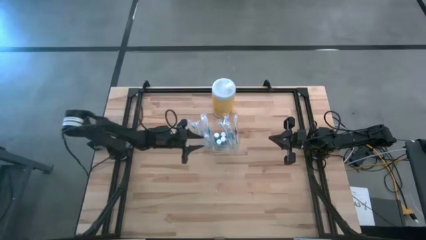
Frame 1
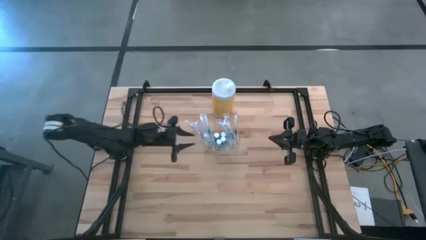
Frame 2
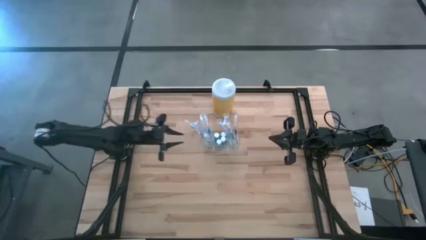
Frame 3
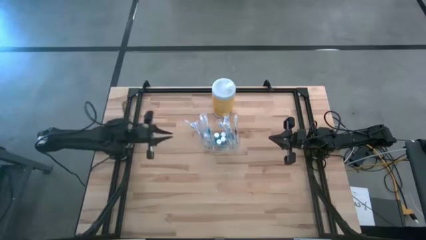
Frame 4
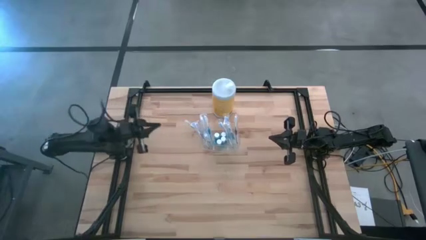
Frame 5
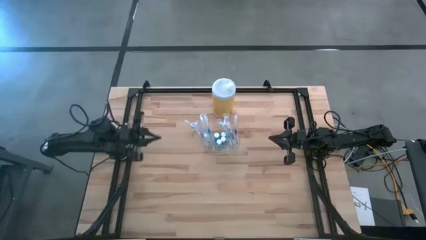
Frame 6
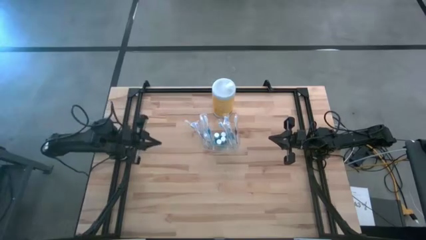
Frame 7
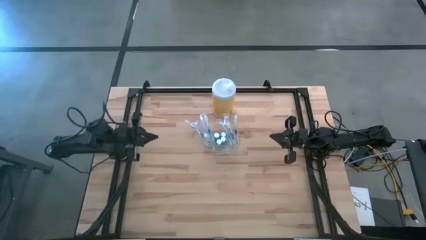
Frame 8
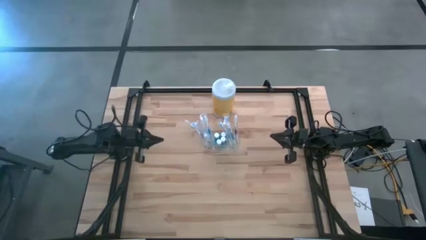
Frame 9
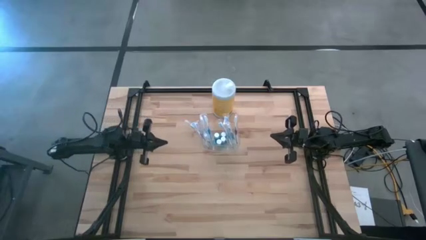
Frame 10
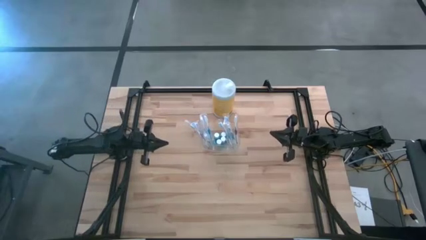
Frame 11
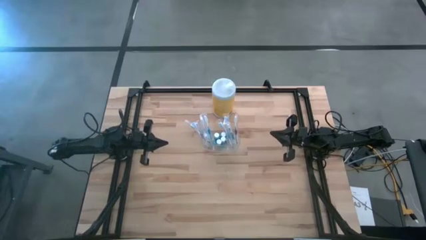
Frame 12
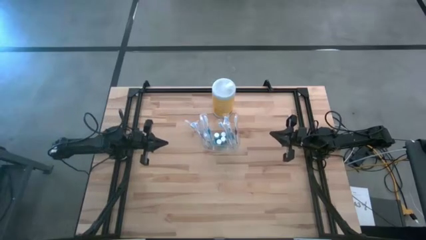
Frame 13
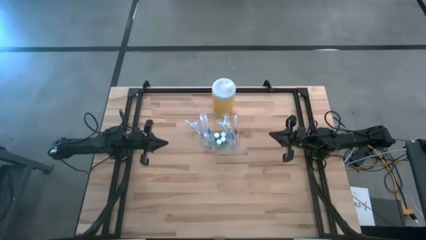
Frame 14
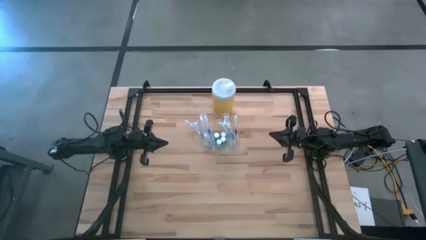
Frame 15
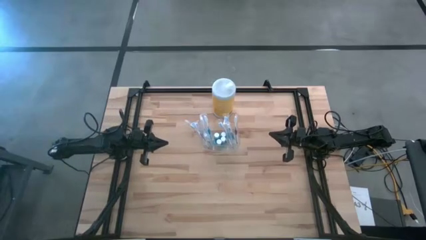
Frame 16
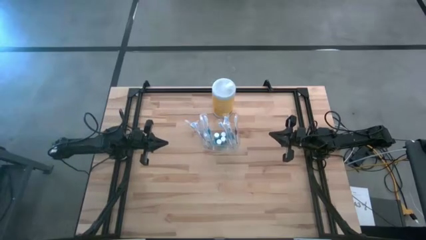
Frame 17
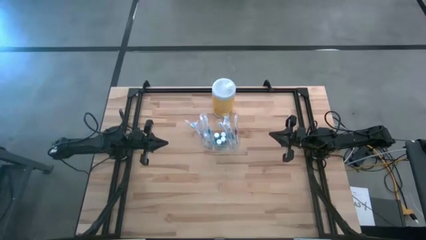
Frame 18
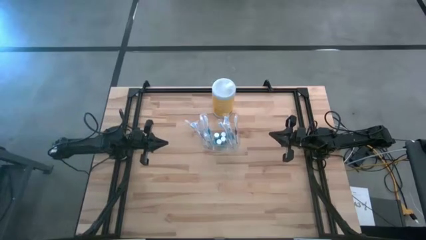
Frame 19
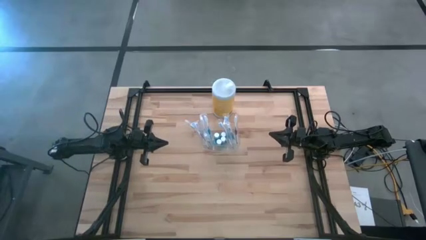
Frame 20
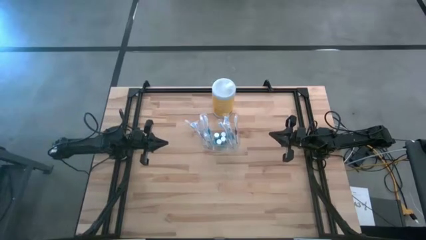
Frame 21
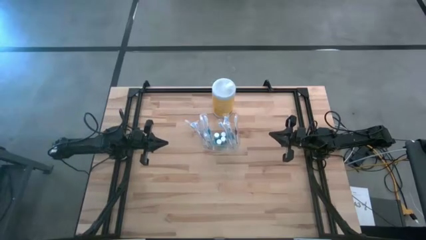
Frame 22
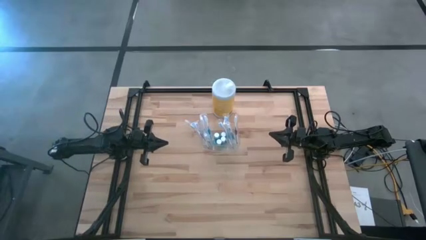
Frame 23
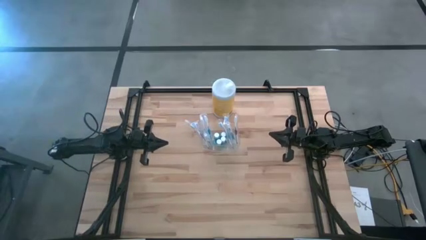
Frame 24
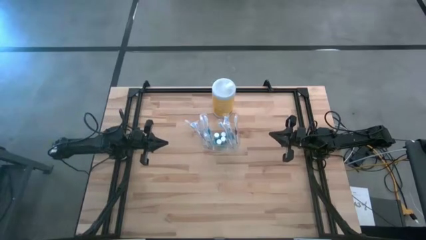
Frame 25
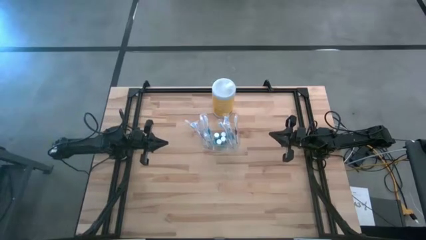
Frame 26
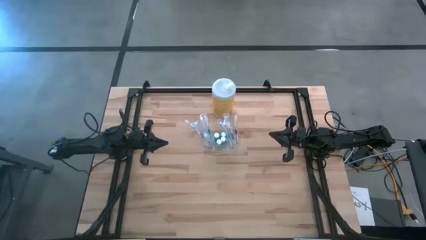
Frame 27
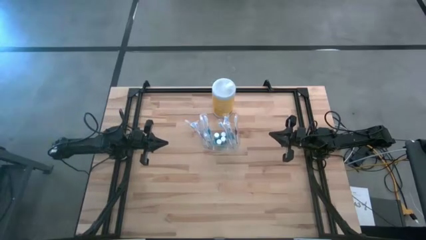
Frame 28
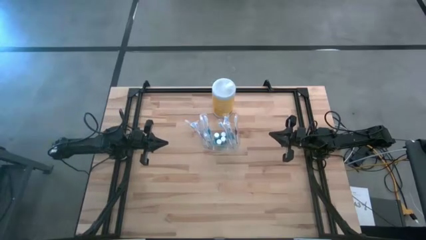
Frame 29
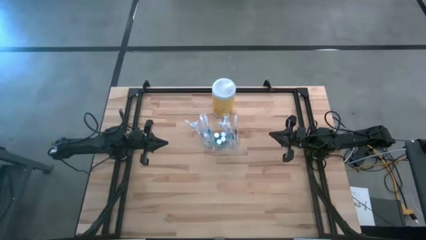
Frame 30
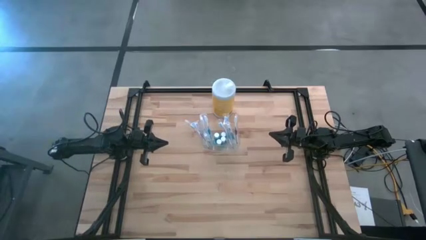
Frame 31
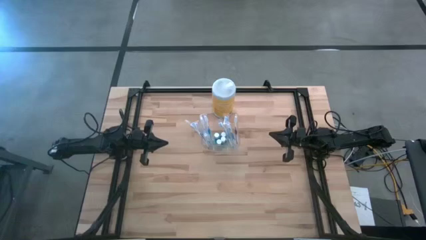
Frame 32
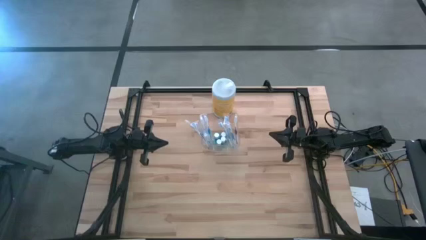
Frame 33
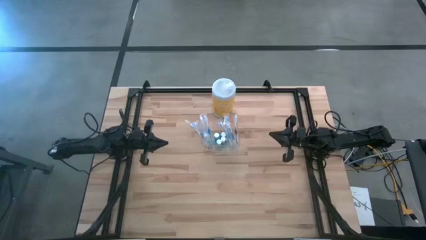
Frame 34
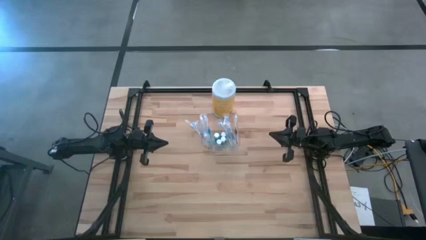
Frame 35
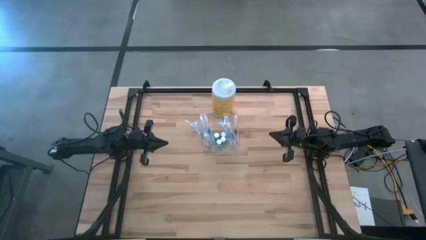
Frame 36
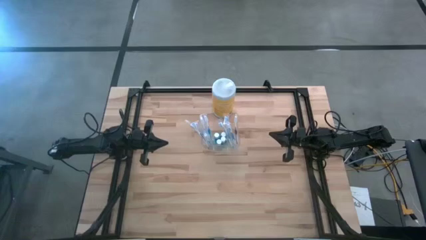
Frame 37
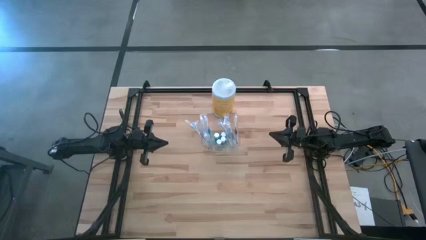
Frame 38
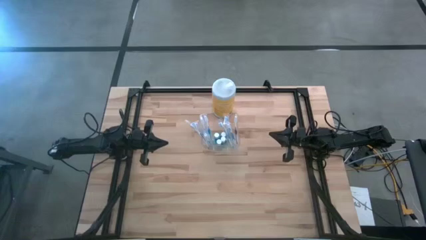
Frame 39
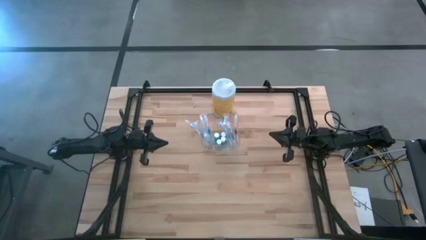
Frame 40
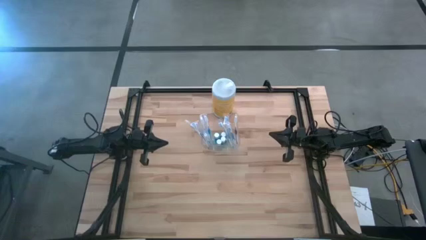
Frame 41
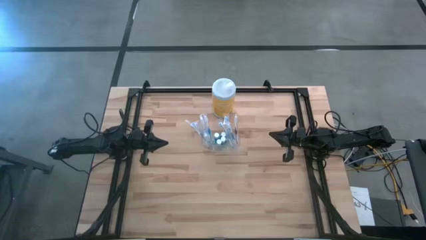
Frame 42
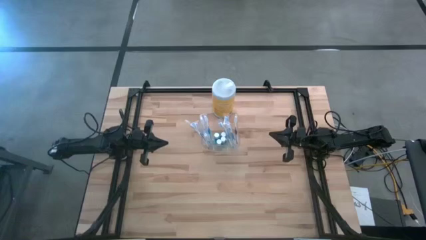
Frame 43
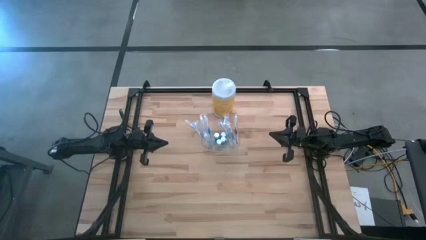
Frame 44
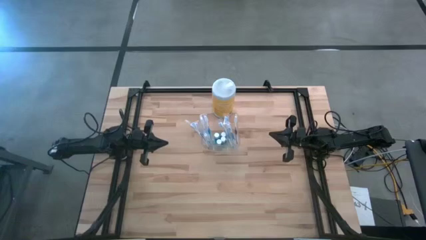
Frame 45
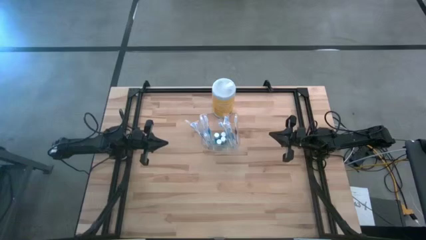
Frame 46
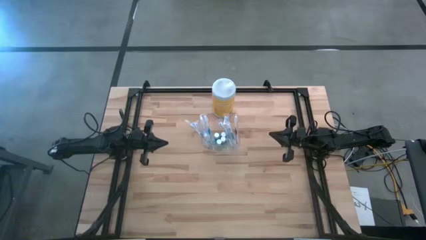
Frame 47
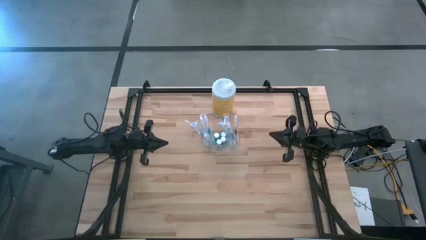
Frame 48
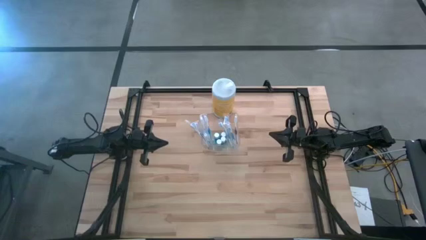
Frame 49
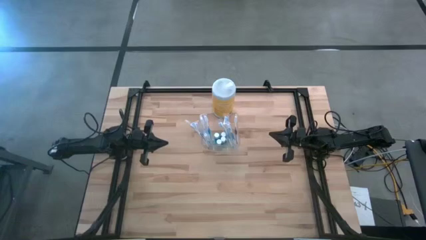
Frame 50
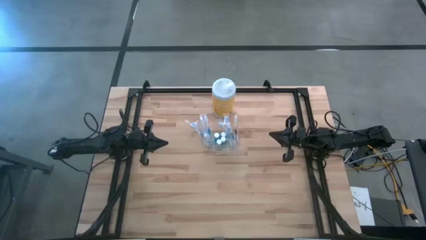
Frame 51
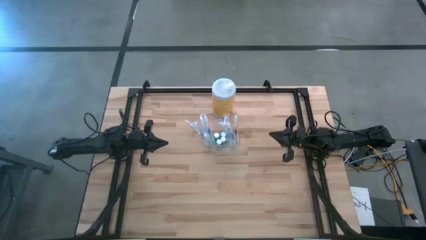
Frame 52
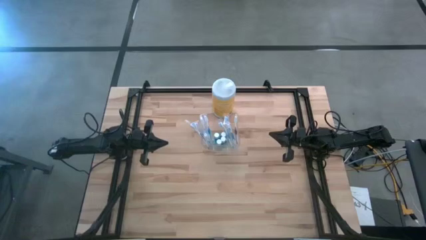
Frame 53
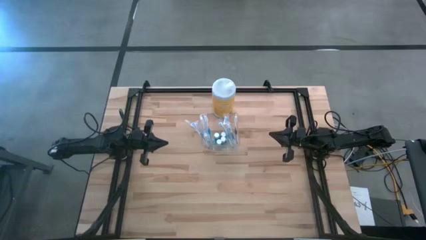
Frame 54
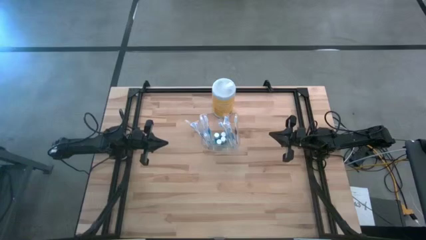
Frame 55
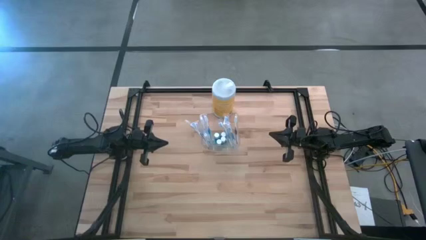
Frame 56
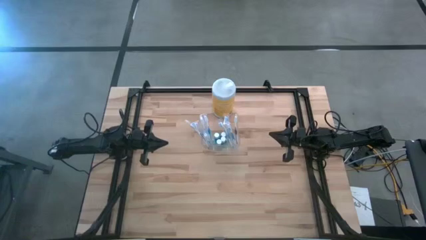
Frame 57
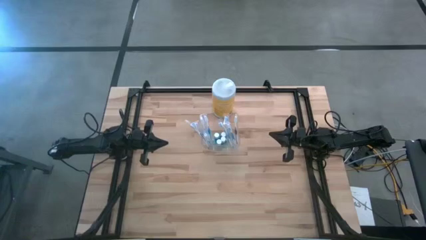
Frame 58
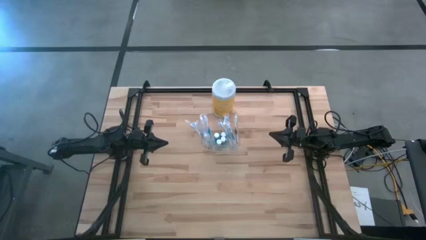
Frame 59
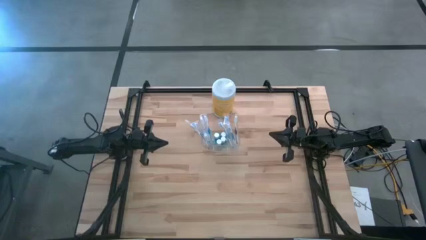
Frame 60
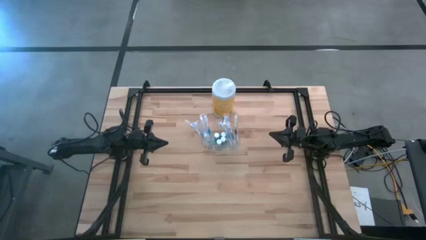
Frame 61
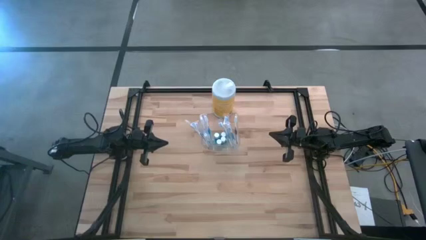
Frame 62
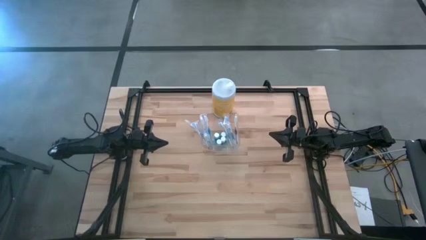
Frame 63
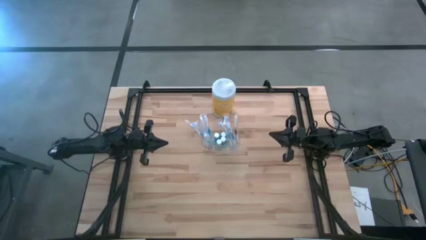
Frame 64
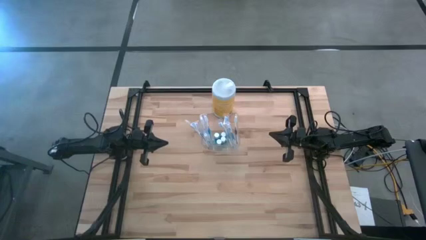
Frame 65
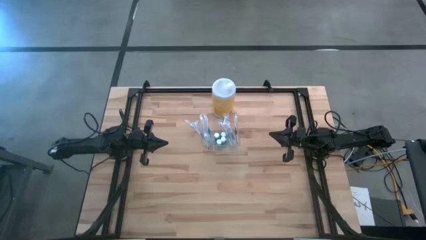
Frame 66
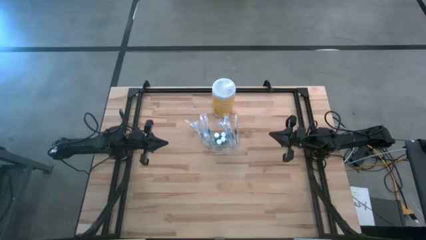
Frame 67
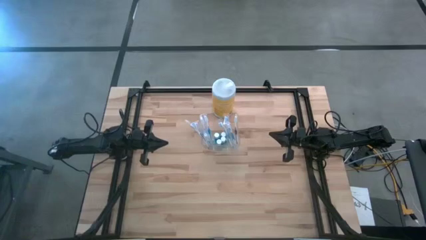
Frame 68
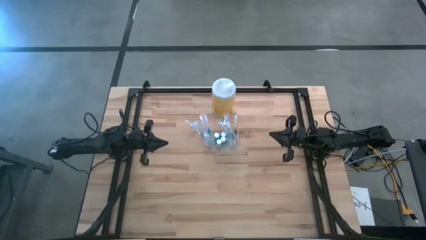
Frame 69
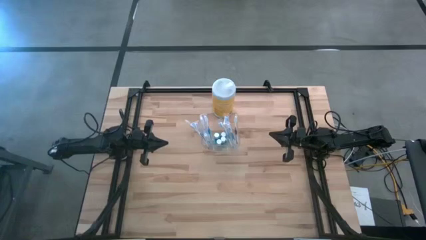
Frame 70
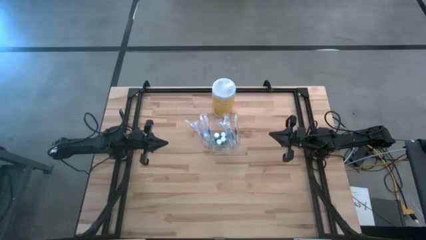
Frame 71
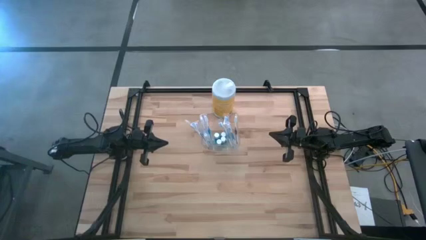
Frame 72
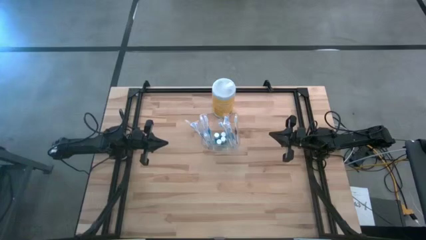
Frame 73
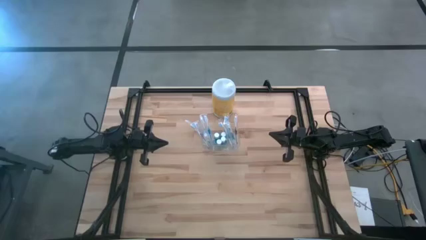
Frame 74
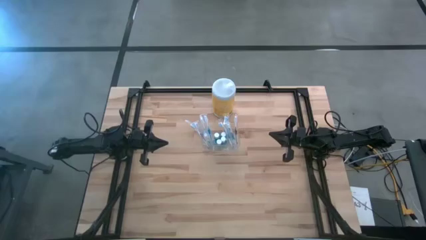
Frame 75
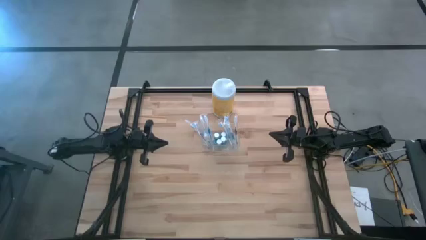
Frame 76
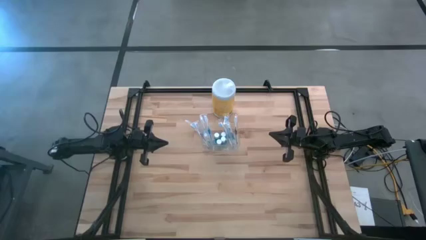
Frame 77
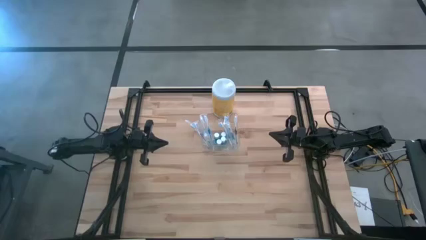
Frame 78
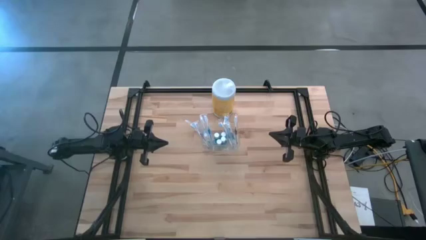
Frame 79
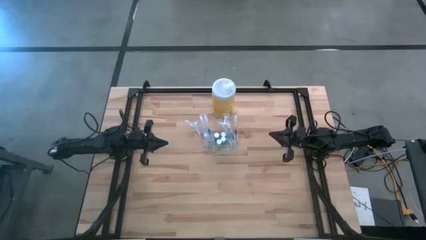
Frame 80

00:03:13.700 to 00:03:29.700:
Task: Pick & Place toothbrushing station
Return to Home Position
